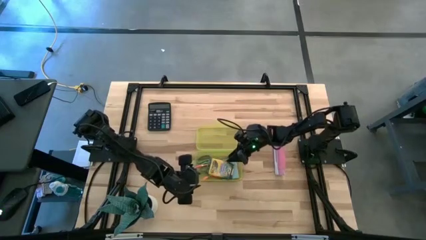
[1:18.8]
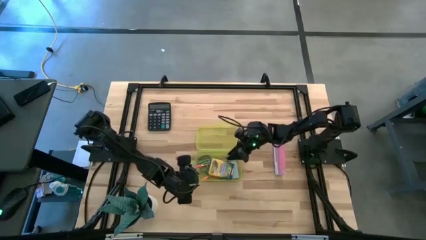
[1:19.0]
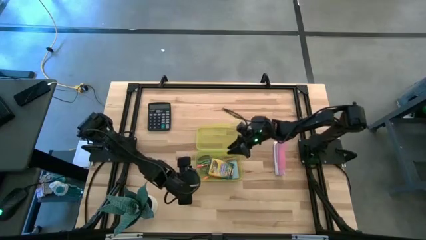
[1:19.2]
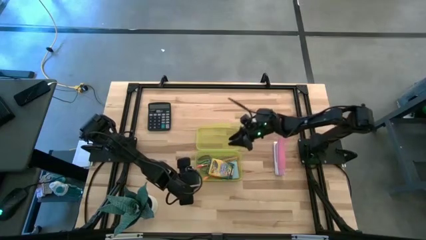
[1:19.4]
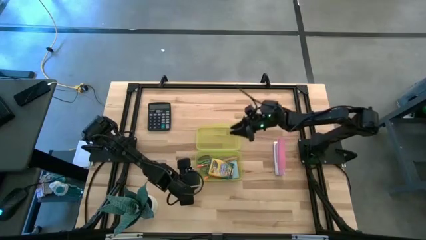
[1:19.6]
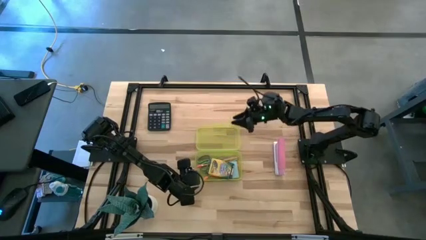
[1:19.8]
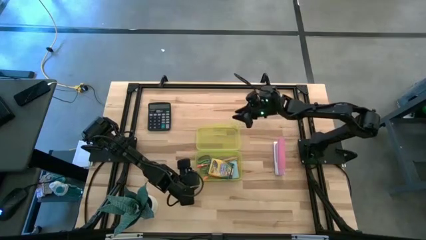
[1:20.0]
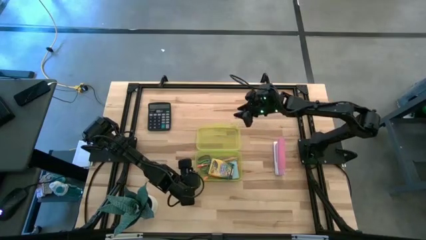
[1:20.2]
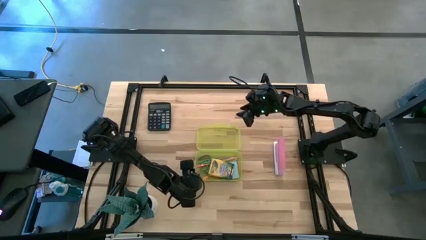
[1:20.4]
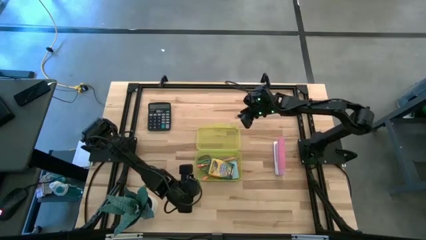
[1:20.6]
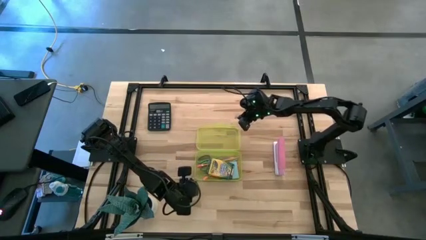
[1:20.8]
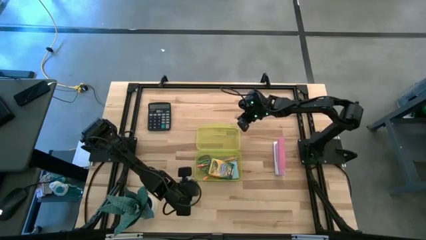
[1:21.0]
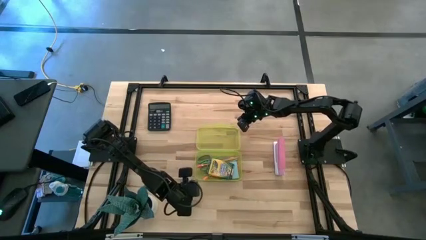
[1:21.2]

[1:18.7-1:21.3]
Task: Pack school essentials
Close the yellow supply box

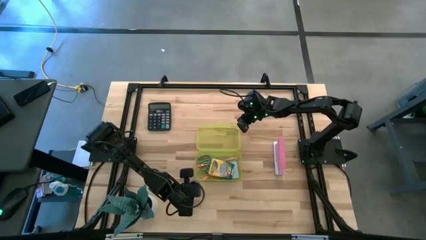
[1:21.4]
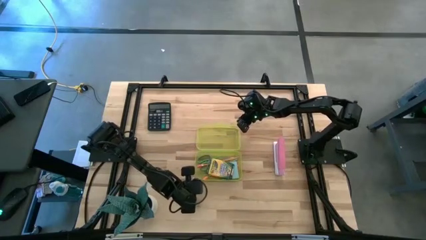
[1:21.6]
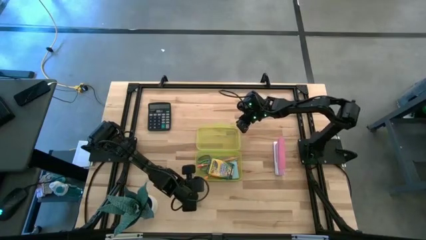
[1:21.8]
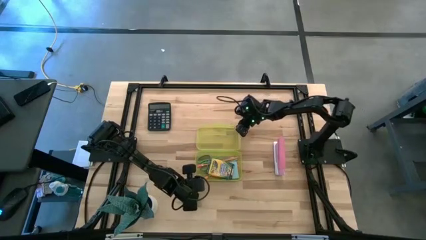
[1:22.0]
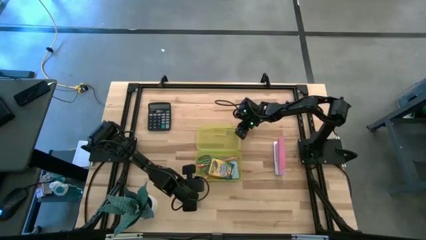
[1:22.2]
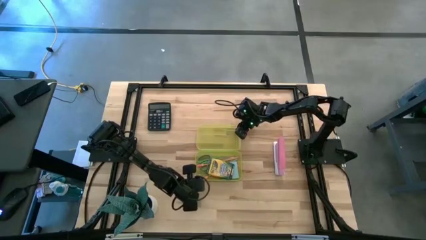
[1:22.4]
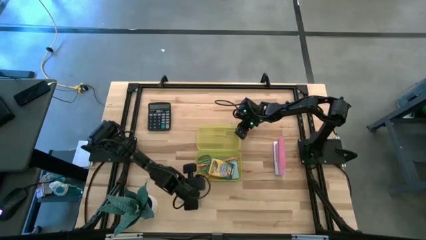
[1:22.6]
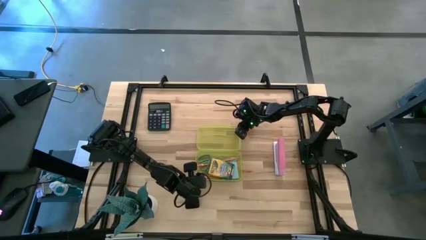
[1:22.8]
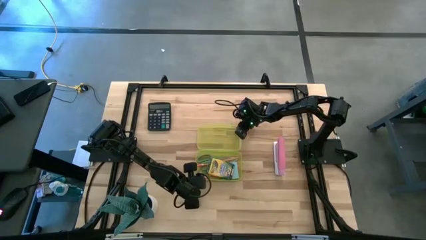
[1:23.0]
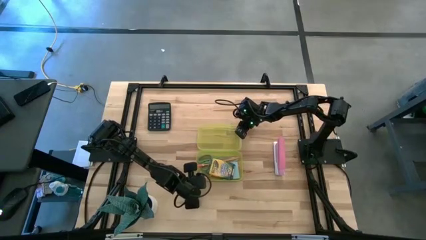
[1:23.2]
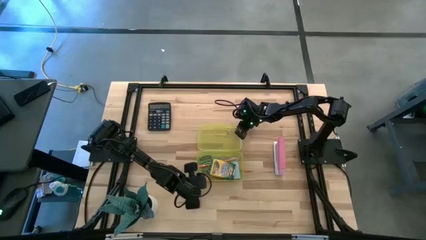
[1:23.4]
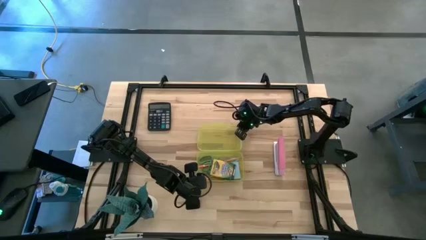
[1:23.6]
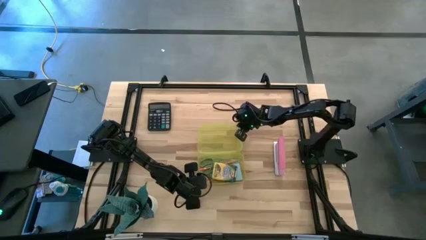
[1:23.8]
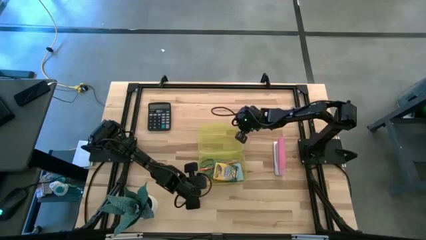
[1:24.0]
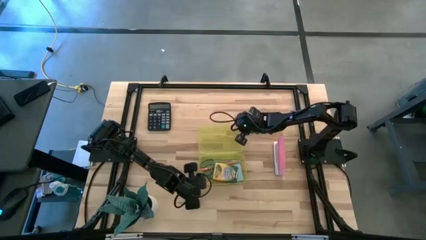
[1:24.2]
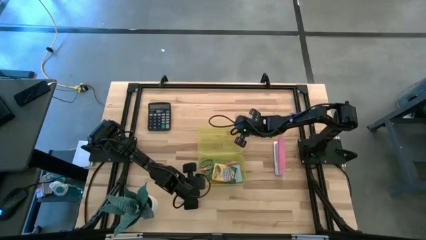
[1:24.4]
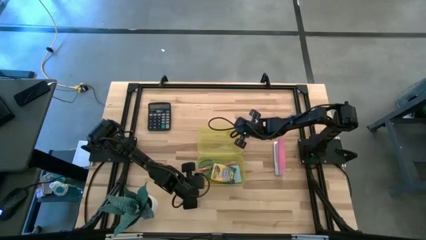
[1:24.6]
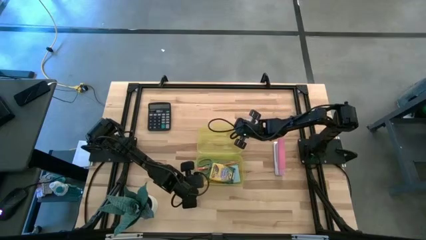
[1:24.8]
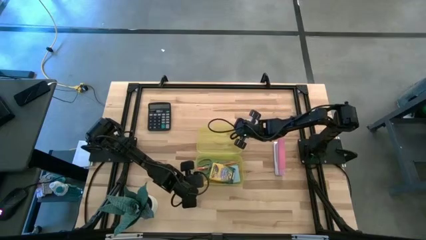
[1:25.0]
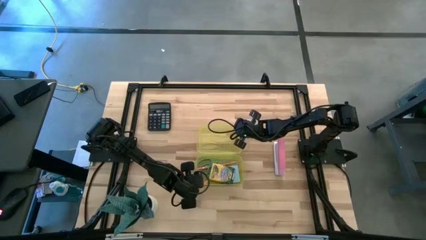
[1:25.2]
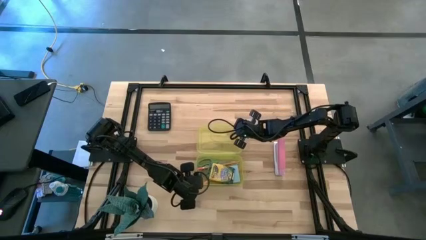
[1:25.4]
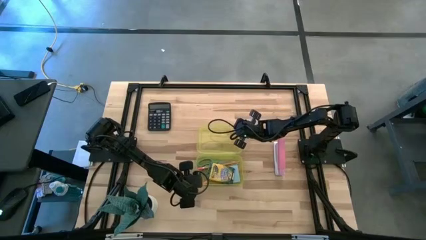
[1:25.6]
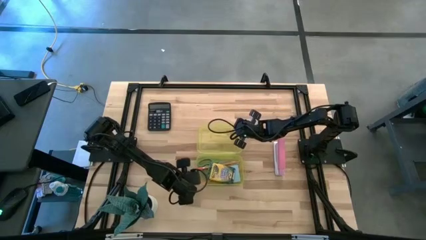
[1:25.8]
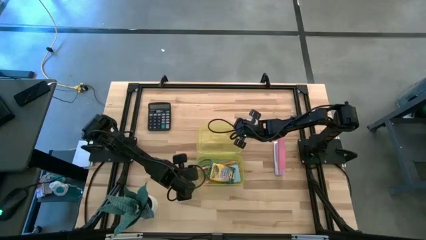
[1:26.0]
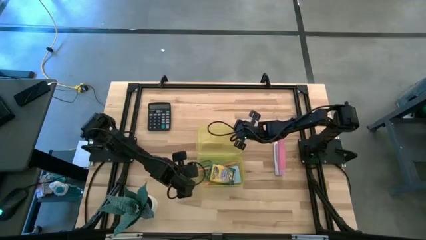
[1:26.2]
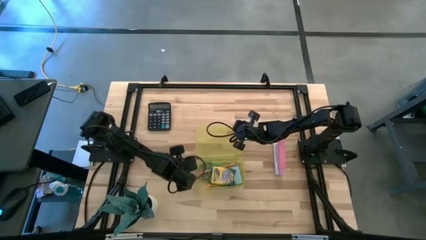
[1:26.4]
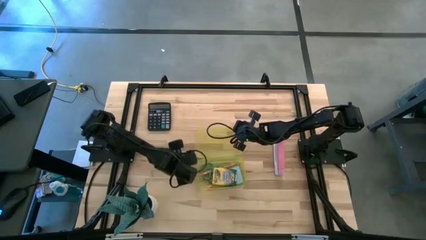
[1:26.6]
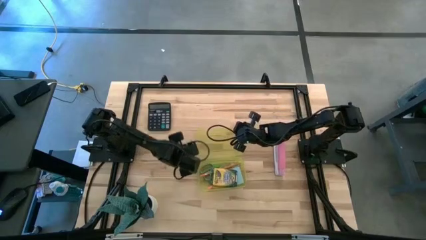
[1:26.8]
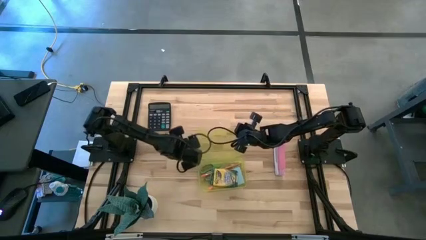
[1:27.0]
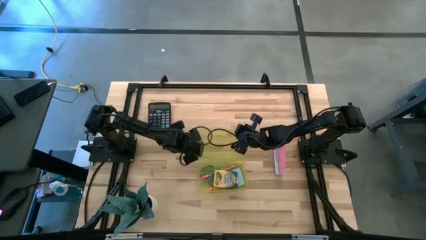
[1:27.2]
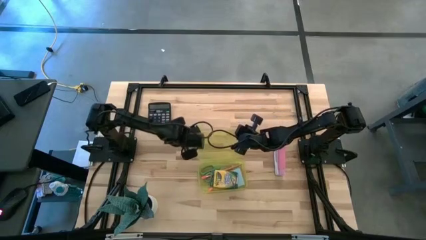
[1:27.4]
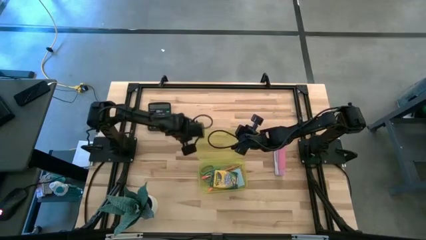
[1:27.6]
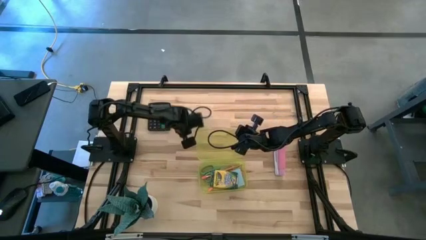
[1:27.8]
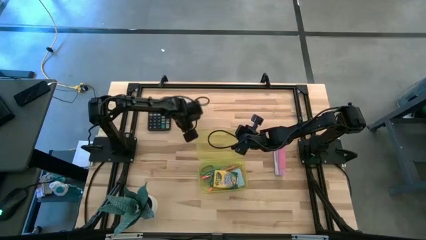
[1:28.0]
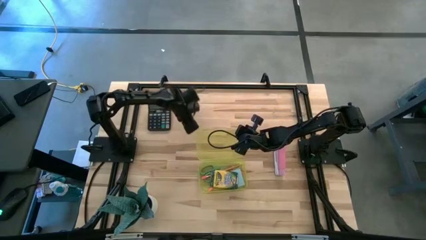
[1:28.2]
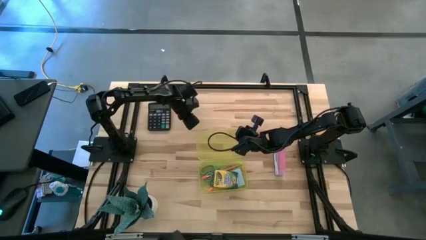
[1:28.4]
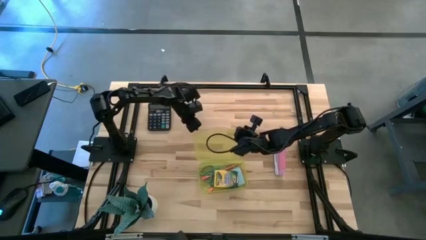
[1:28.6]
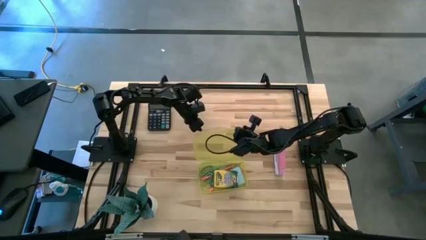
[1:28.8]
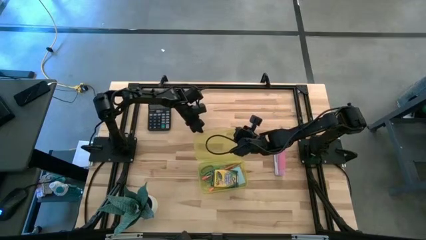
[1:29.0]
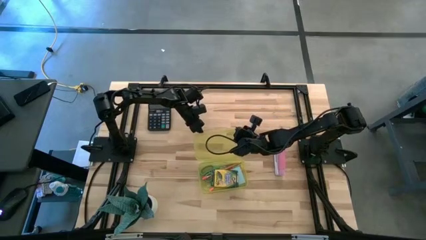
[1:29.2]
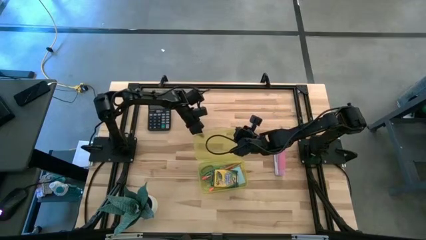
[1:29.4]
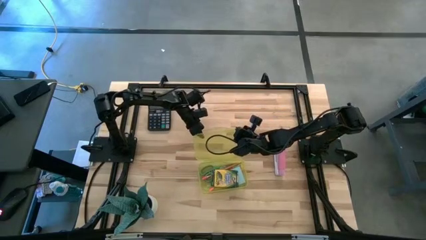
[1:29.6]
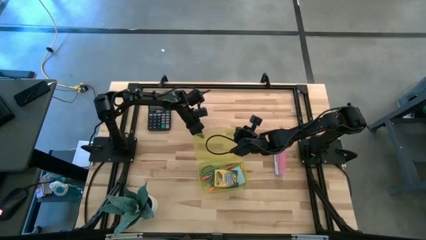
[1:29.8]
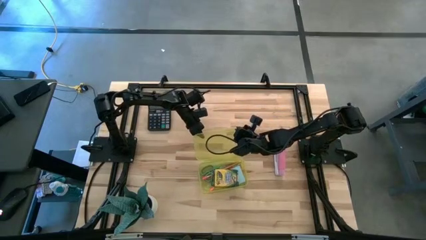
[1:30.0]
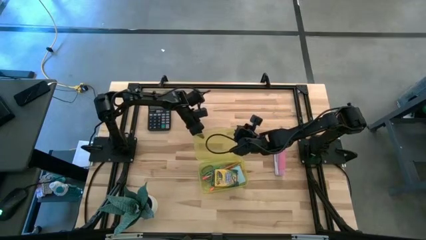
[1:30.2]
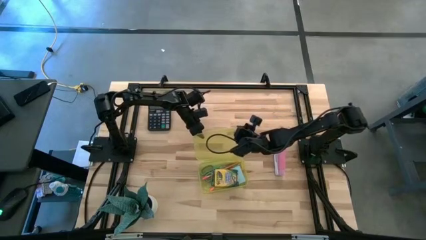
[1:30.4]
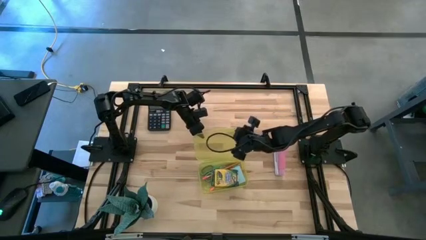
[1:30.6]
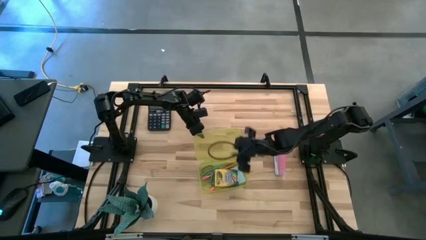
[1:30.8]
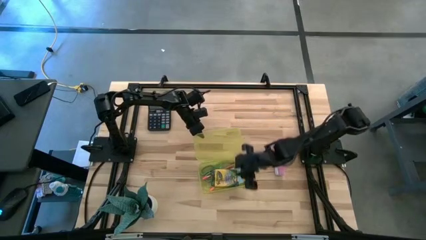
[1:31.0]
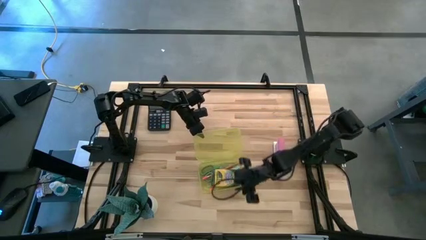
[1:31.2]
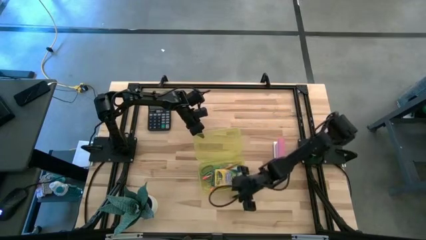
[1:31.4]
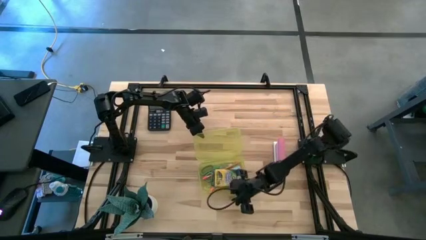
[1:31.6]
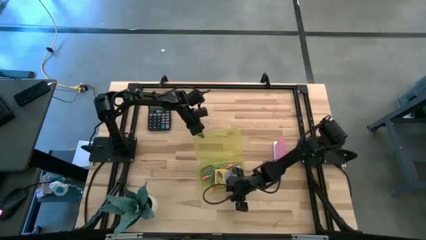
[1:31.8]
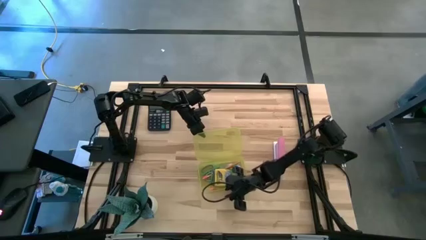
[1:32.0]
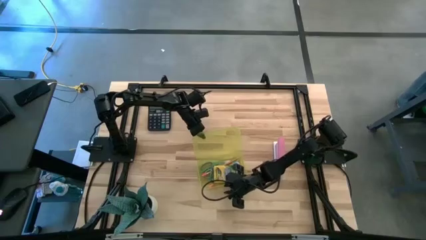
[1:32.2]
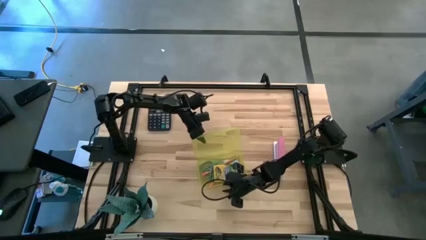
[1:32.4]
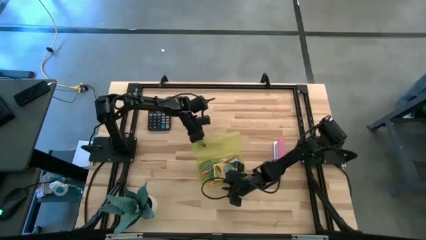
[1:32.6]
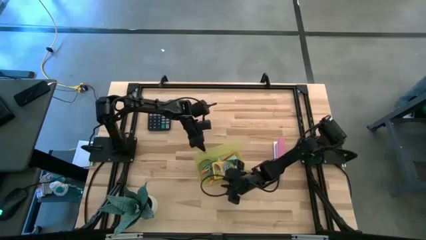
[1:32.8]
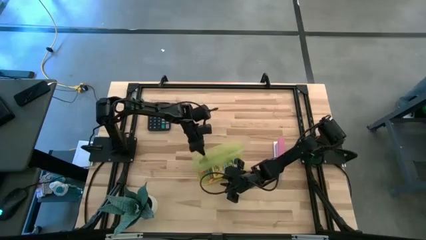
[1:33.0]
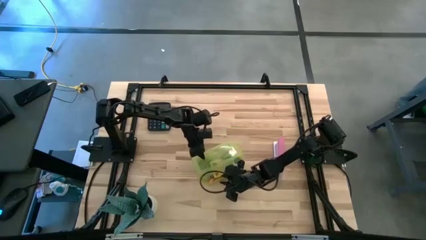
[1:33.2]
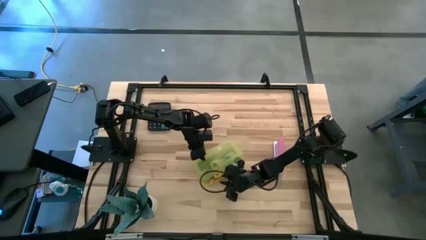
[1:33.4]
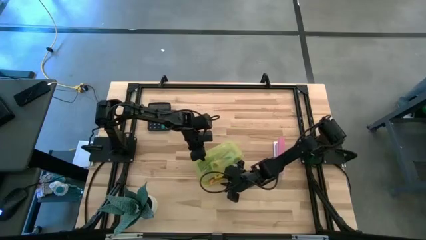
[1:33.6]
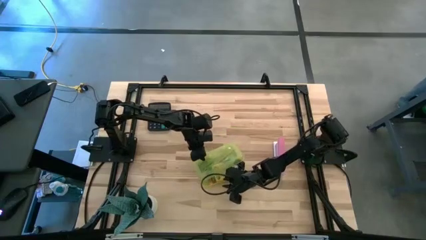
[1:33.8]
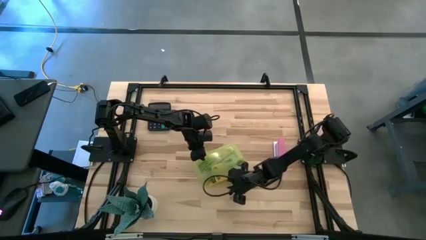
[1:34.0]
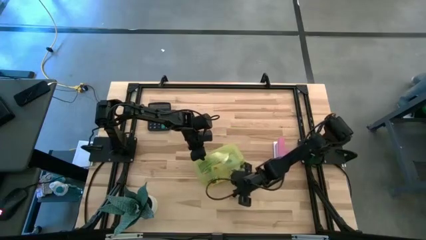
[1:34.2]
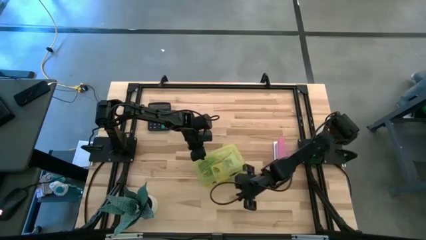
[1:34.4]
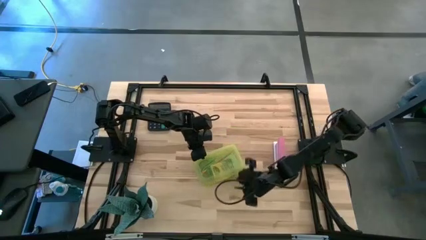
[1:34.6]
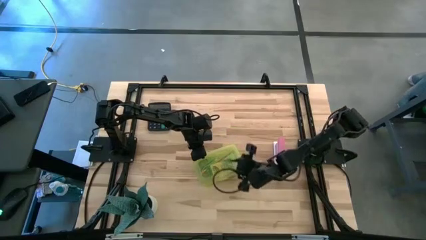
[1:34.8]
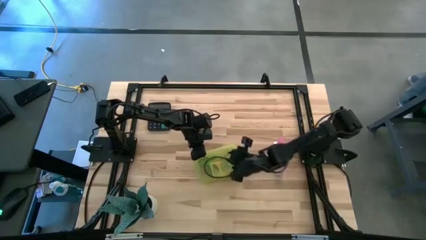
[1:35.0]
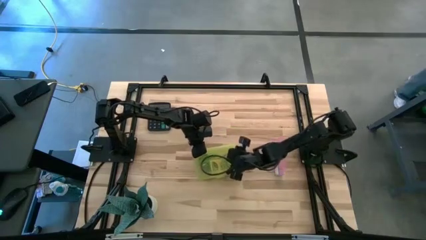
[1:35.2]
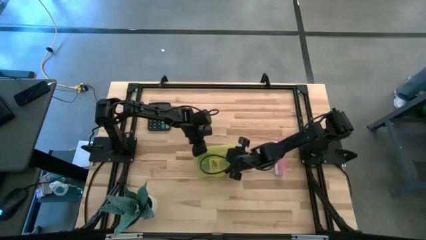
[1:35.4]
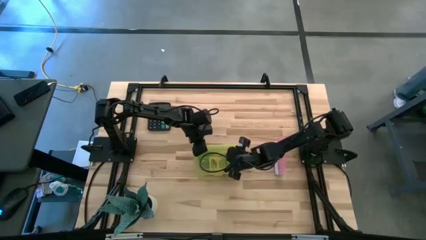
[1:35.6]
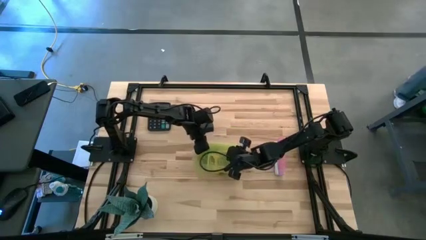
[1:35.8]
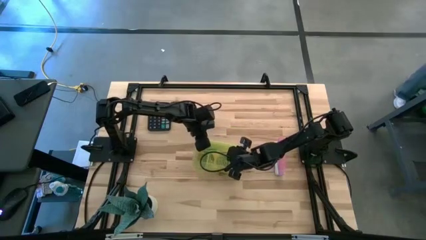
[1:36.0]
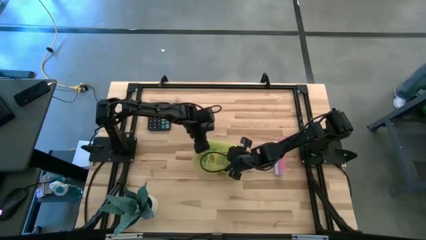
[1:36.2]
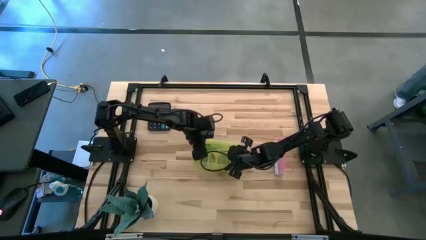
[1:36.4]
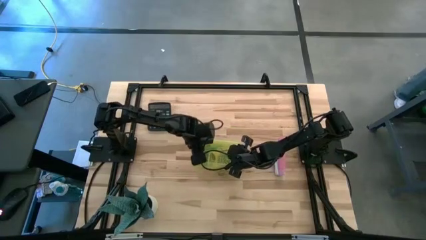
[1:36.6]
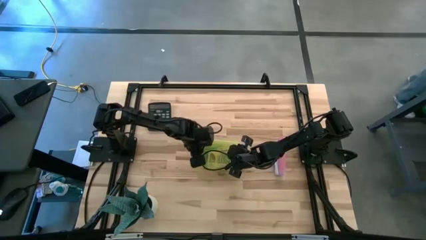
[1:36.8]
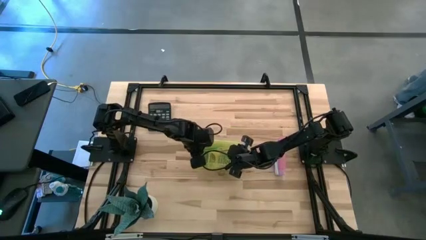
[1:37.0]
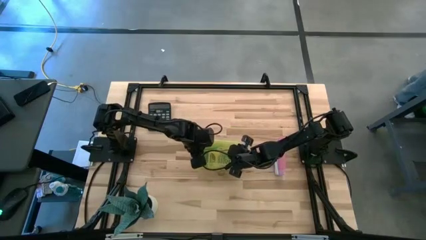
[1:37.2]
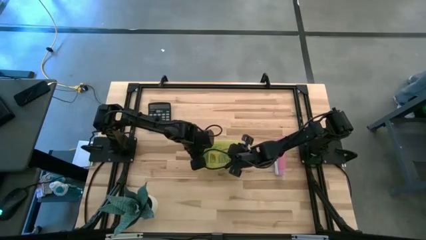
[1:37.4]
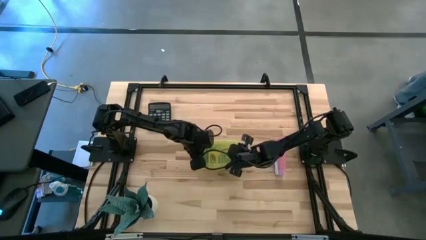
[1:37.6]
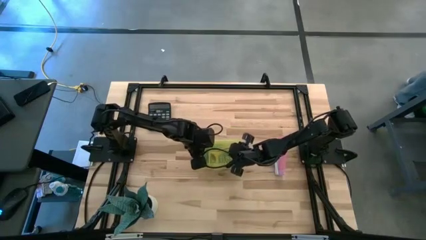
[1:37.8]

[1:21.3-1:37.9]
Close the yellow supply box
